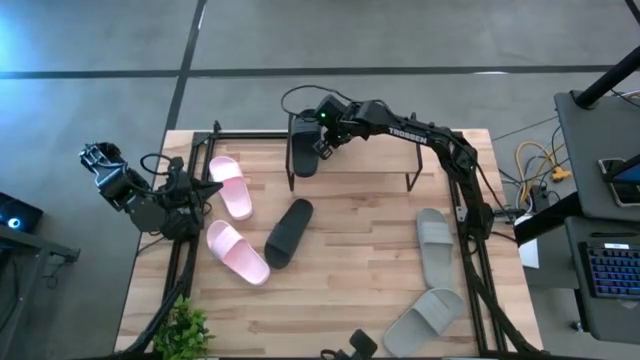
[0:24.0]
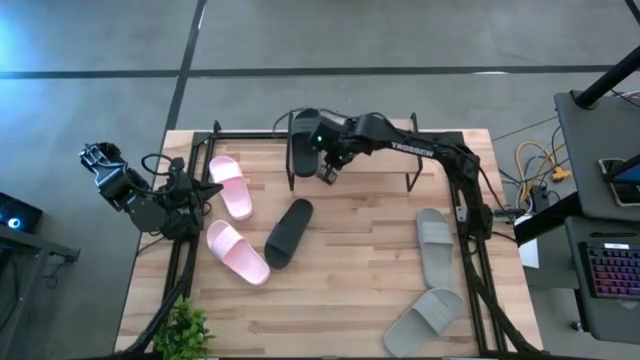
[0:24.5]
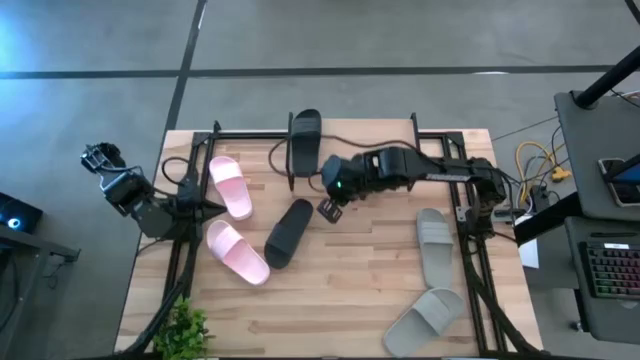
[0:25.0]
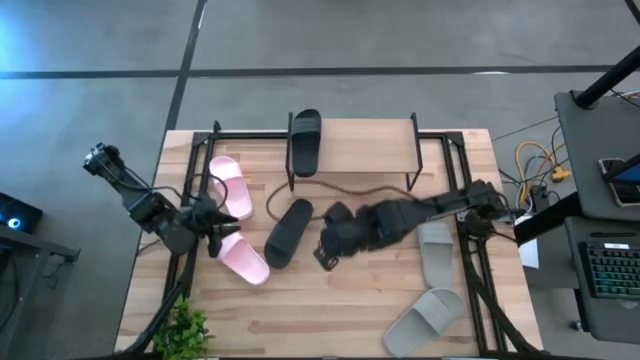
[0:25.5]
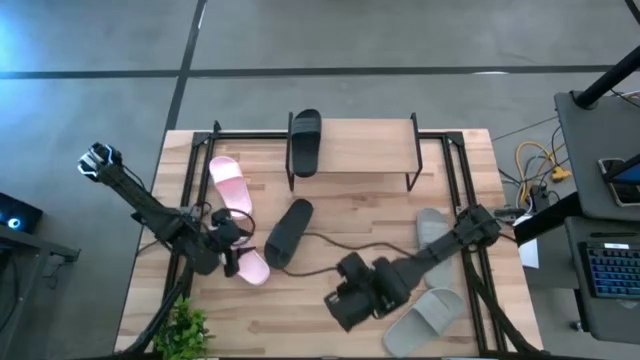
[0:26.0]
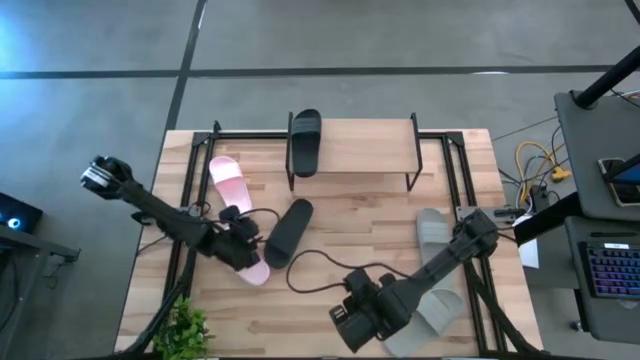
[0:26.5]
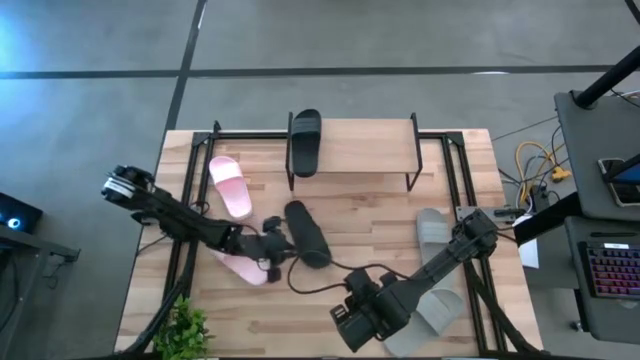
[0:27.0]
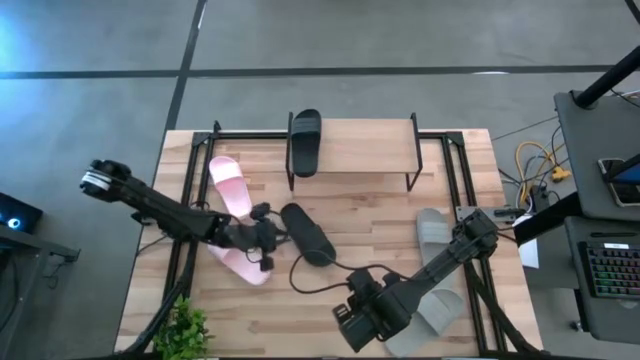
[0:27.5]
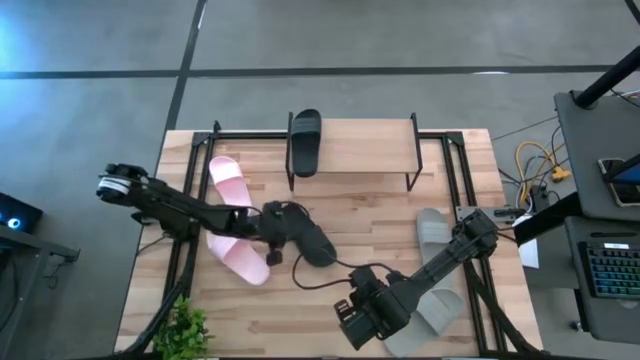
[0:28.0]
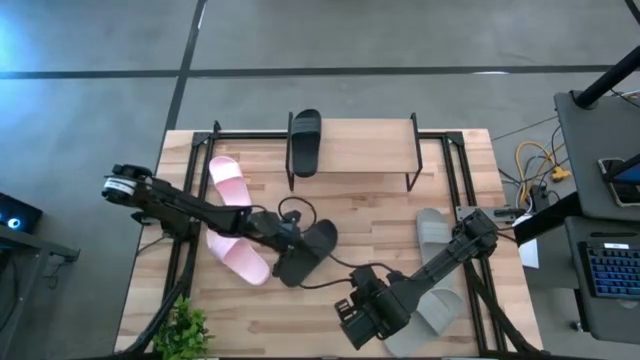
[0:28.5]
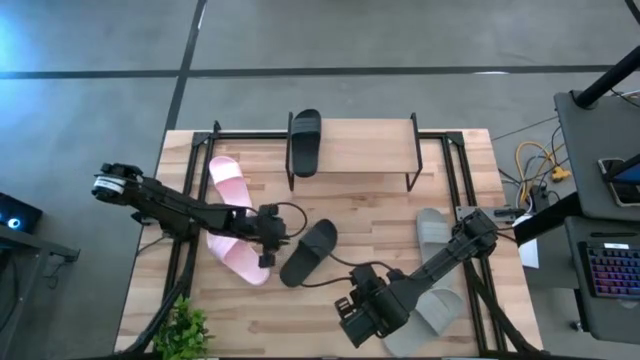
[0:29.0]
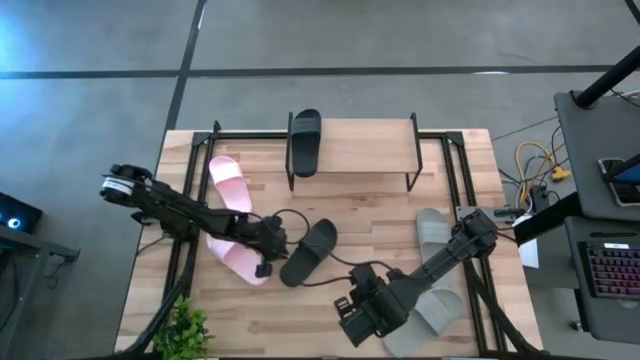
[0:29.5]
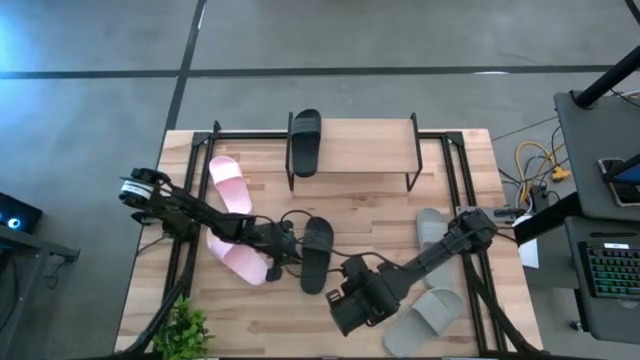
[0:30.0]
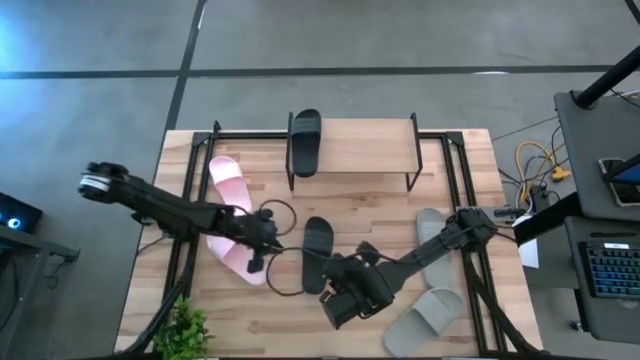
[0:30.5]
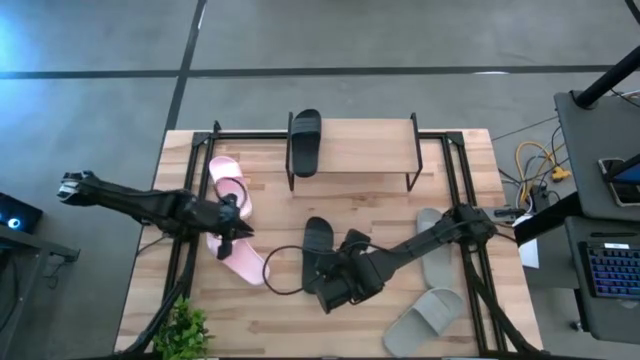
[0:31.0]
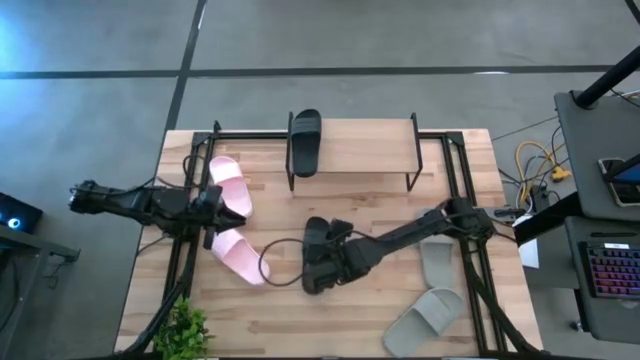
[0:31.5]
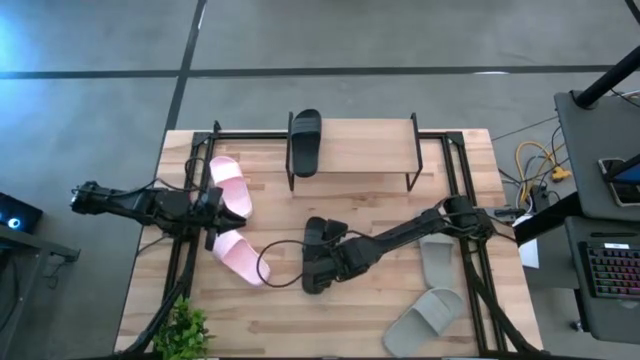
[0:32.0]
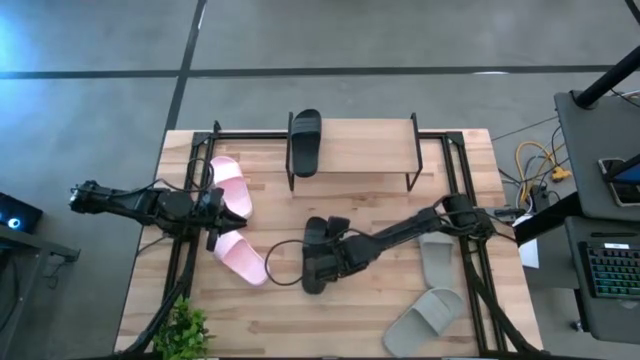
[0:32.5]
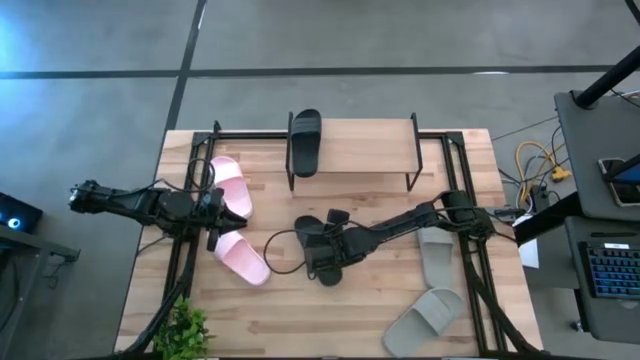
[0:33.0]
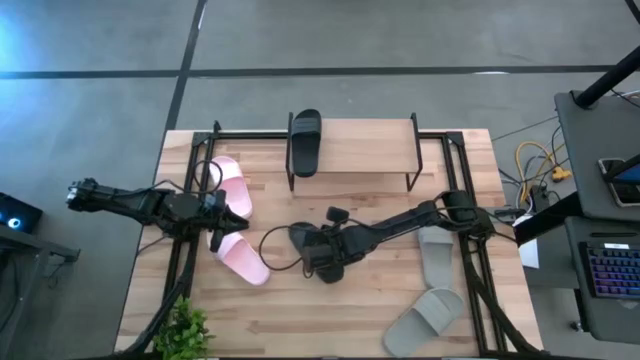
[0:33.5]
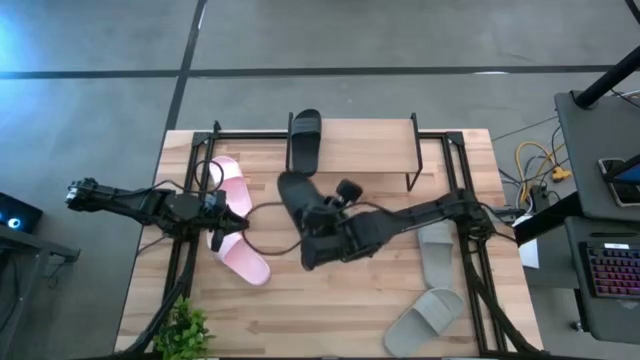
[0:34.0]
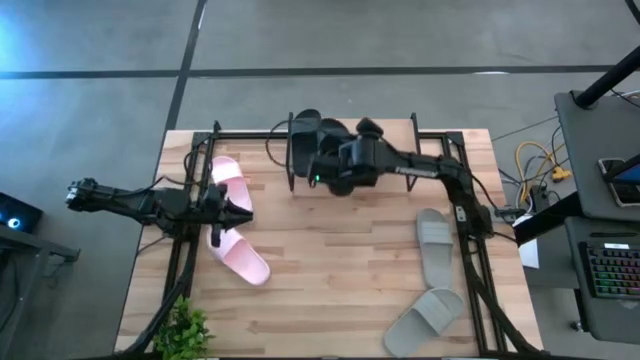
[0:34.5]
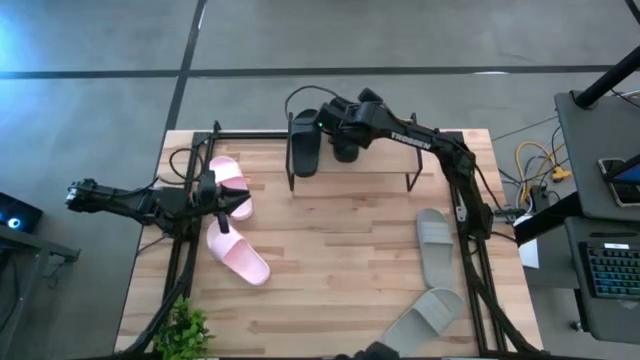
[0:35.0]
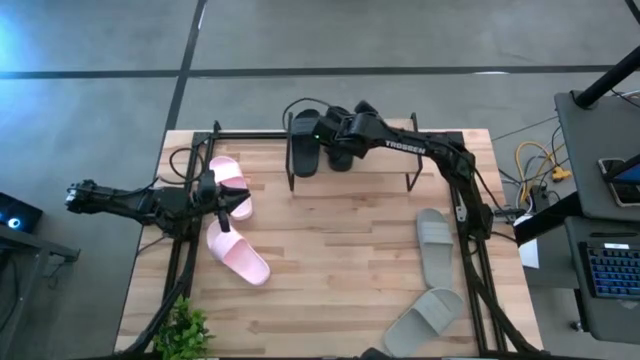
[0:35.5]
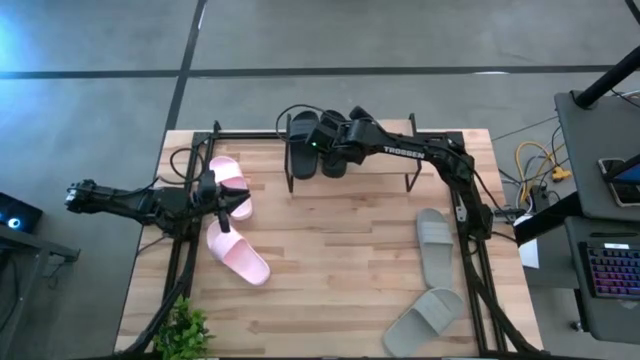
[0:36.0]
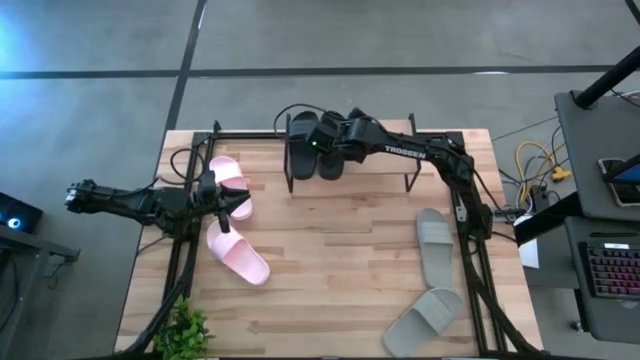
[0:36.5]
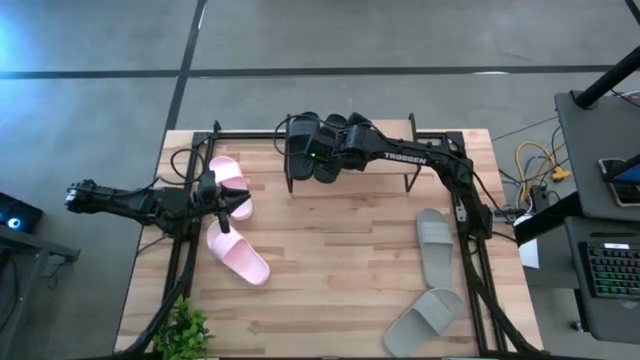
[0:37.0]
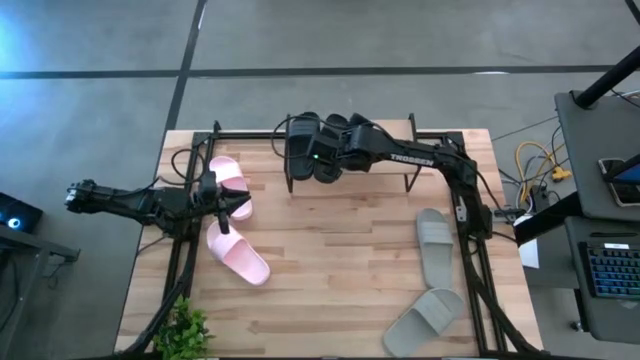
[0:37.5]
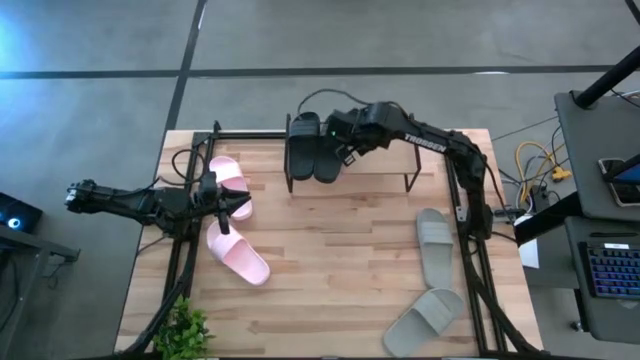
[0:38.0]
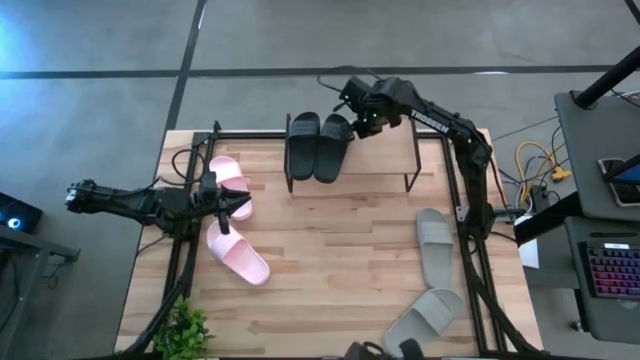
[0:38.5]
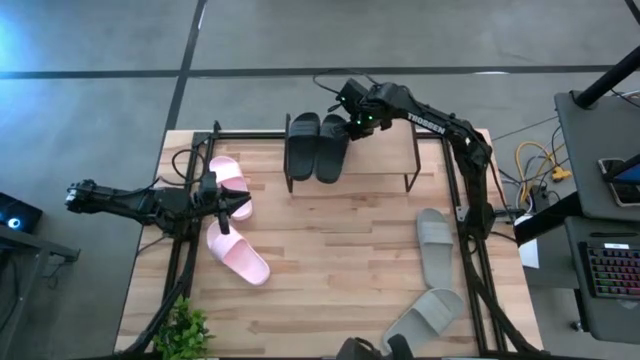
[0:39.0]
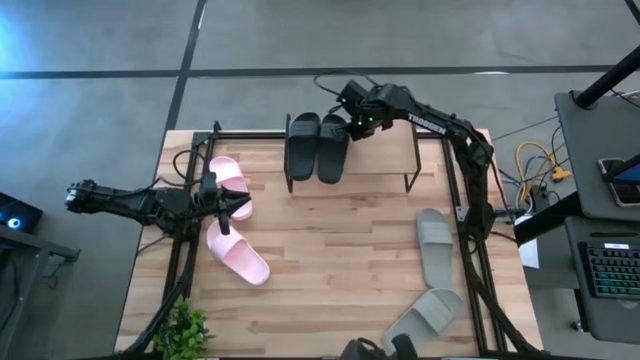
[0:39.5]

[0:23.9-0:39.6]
Task: Pick and place slides into the shelf
Put the black slide on the shelf

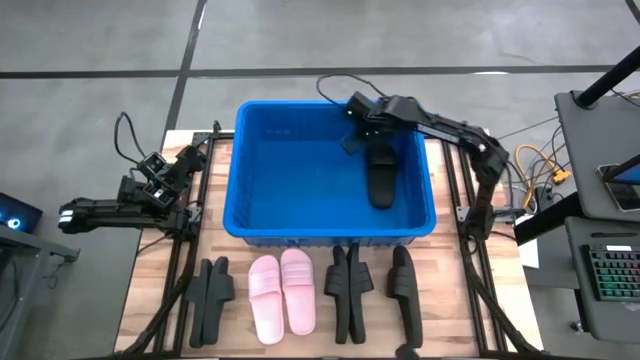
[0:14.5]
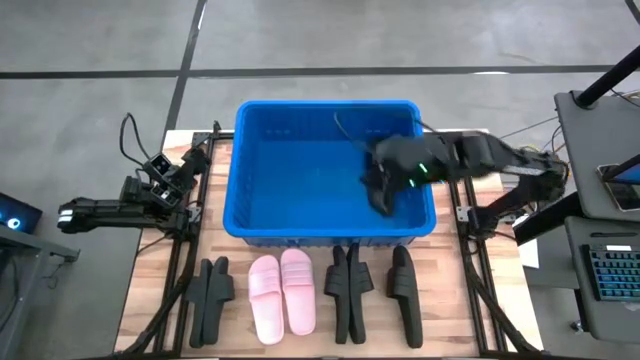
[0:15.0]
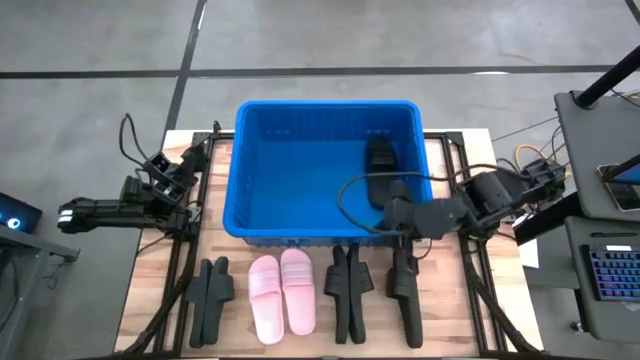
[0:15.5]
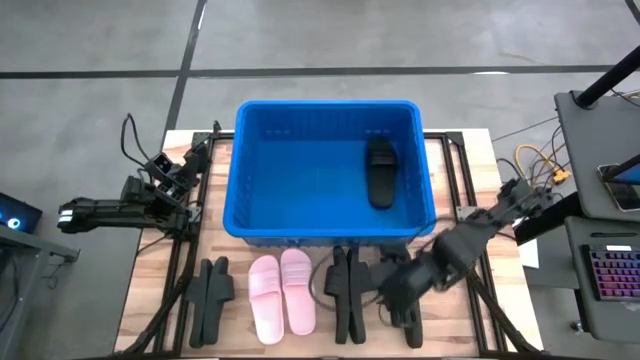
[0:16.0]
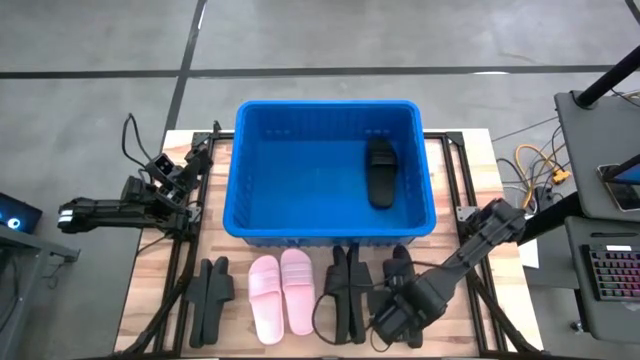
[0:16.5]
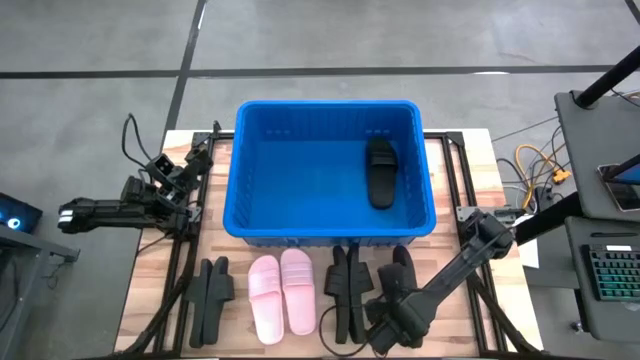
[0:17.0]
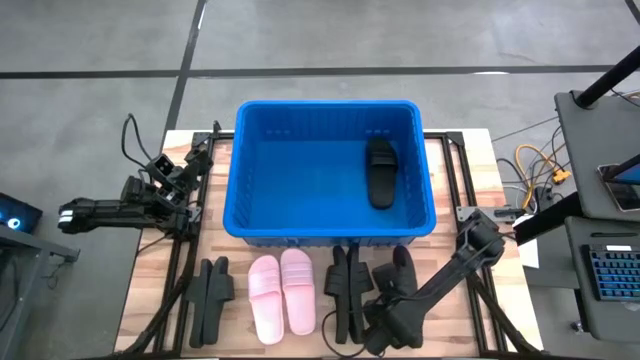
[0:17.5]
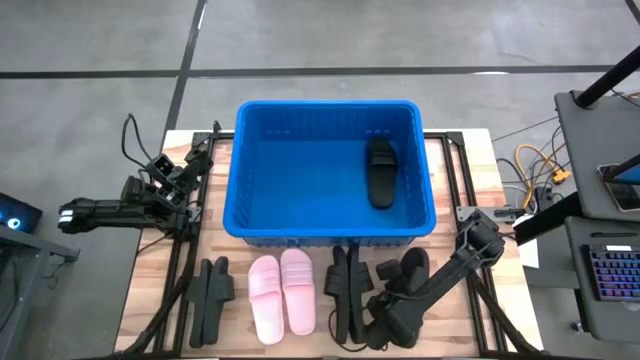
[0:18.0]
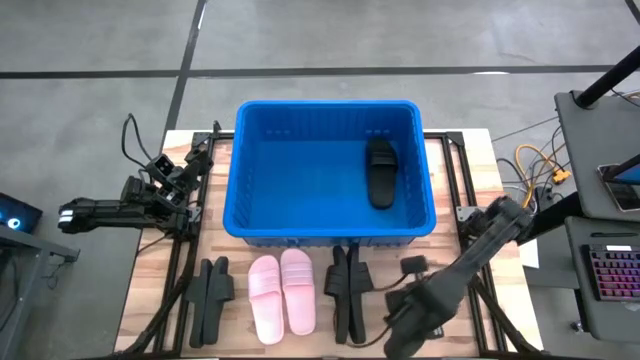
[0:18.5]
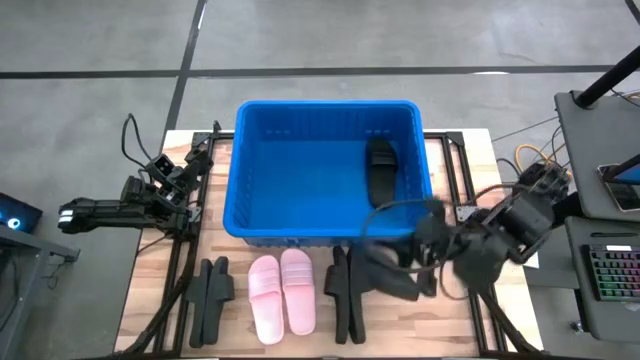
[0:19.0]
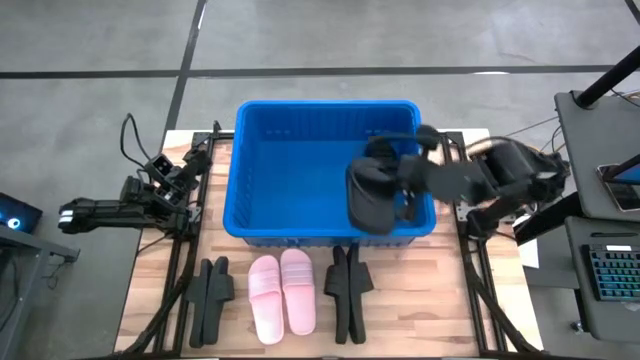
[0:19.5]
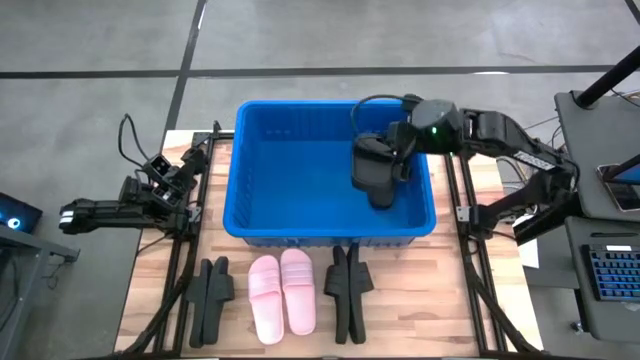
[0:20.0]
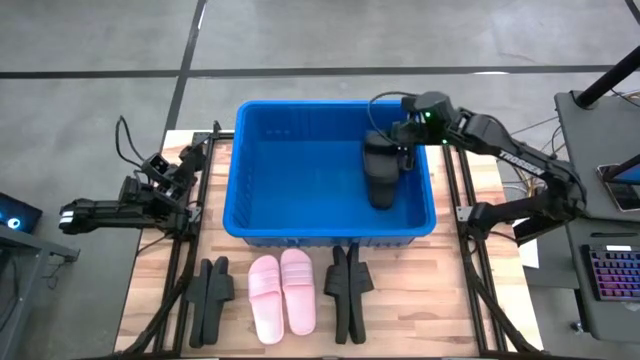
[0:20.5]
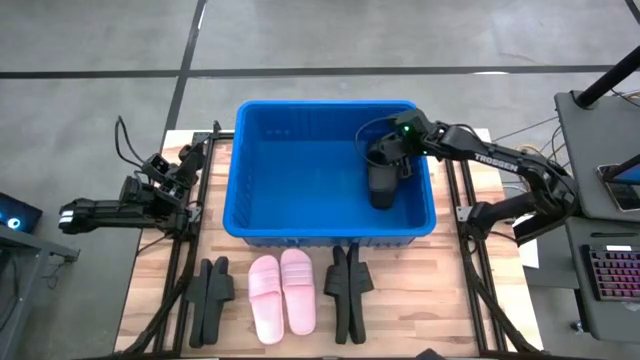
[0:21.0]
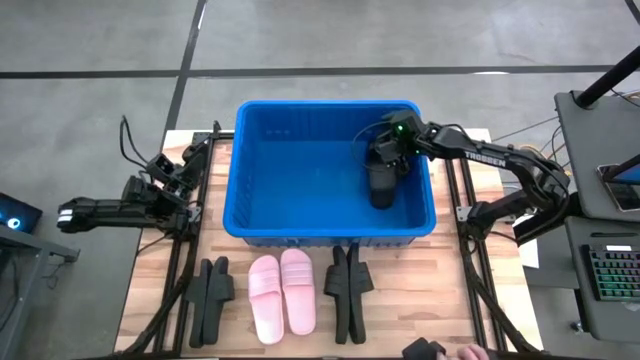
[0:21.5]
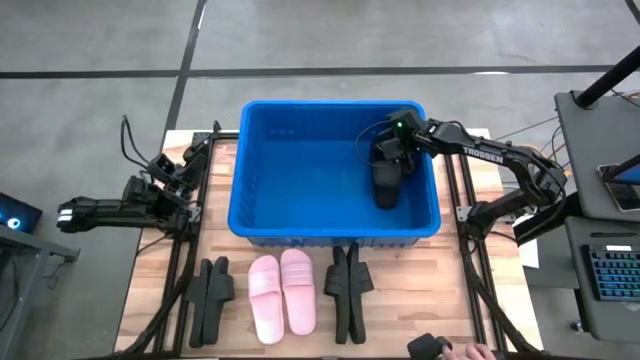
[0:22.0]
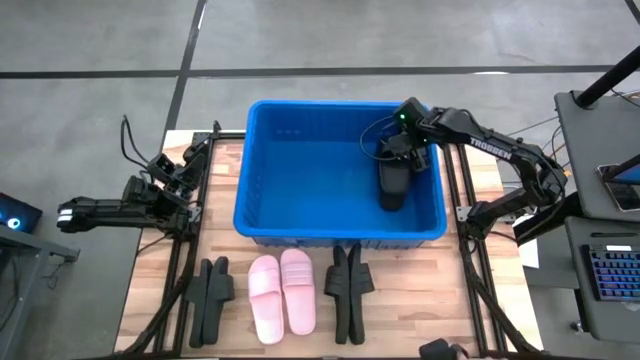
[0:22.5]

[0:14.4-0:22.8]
Task: Pick and place slides into bin
Put the black slipper into the blue bin
